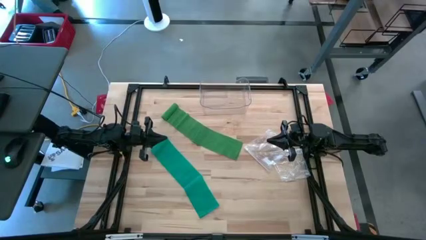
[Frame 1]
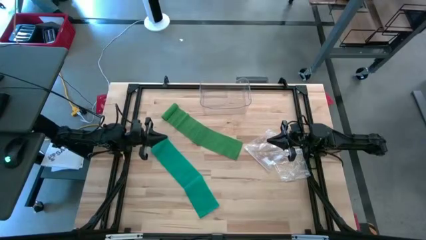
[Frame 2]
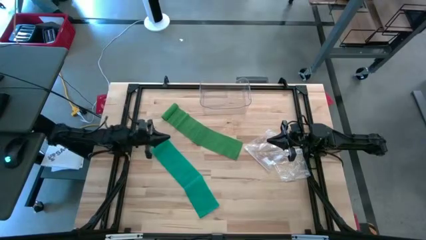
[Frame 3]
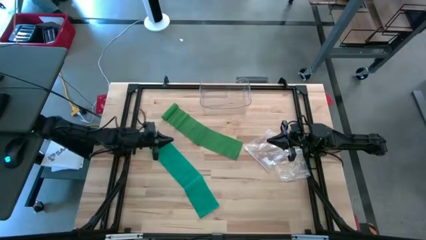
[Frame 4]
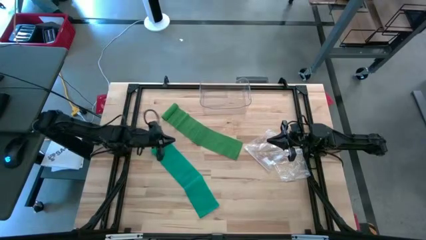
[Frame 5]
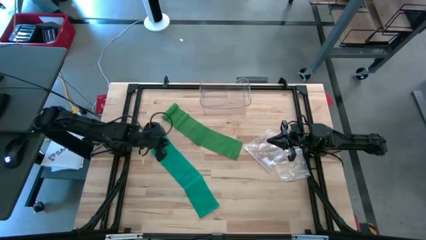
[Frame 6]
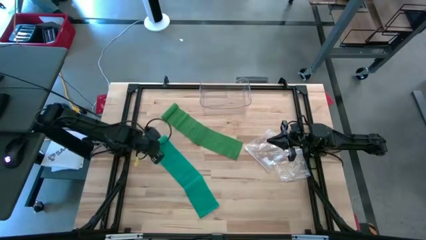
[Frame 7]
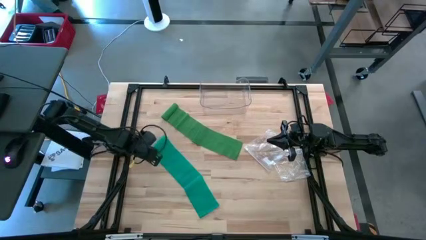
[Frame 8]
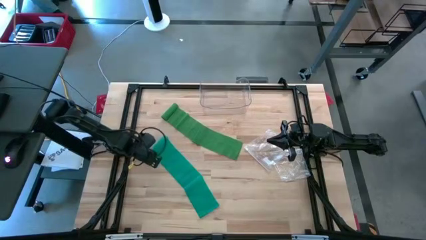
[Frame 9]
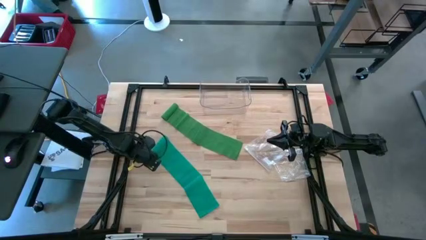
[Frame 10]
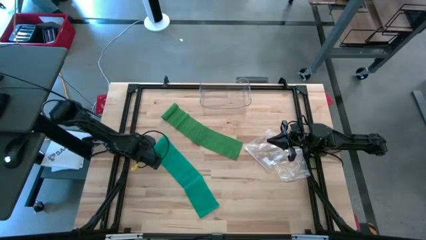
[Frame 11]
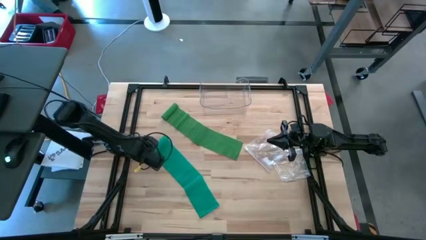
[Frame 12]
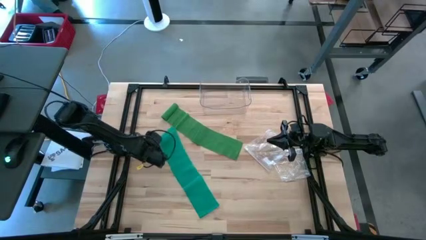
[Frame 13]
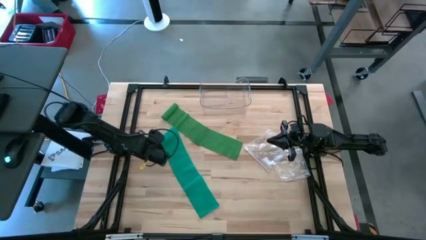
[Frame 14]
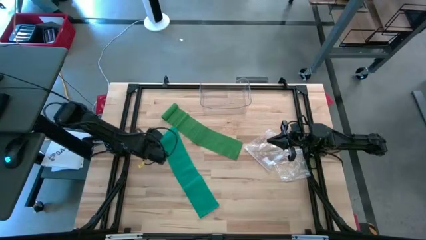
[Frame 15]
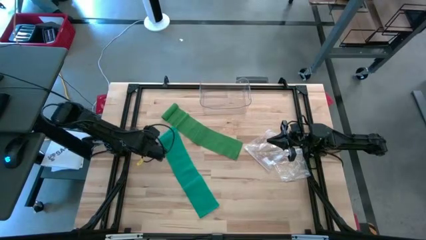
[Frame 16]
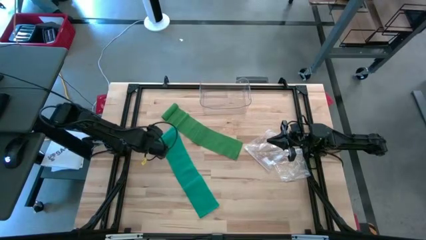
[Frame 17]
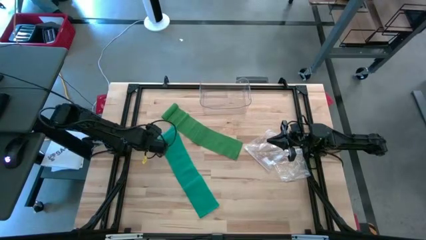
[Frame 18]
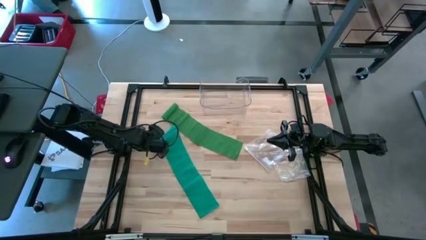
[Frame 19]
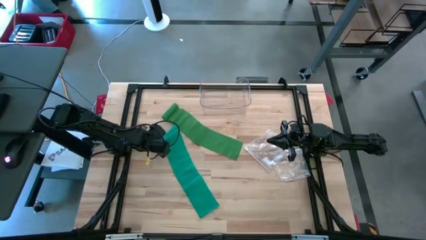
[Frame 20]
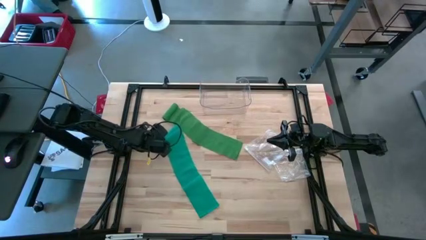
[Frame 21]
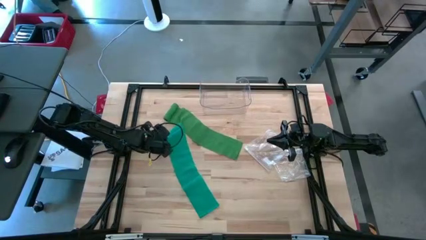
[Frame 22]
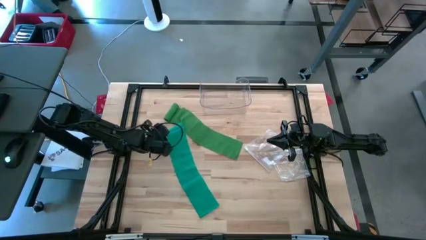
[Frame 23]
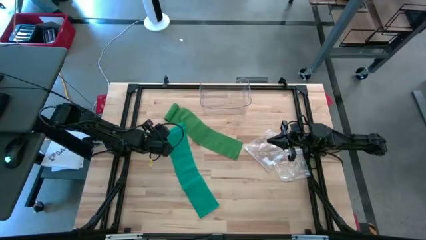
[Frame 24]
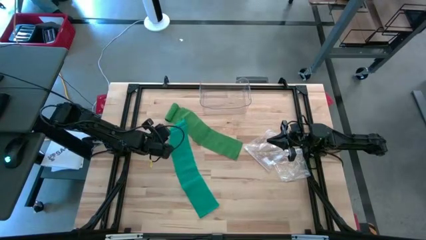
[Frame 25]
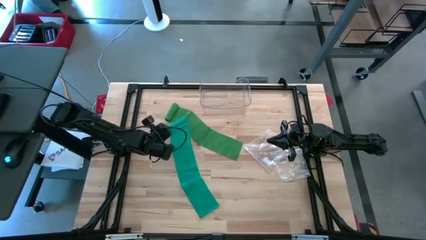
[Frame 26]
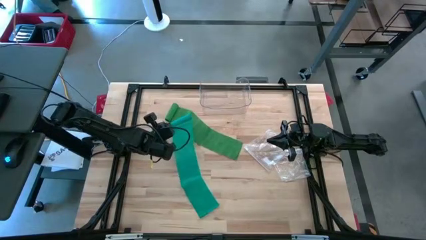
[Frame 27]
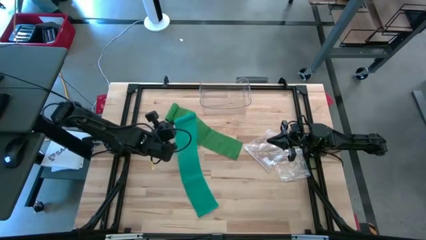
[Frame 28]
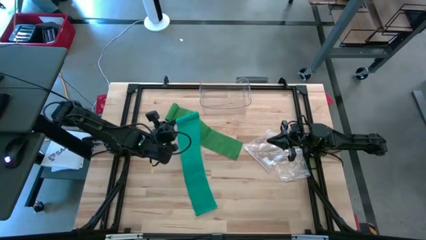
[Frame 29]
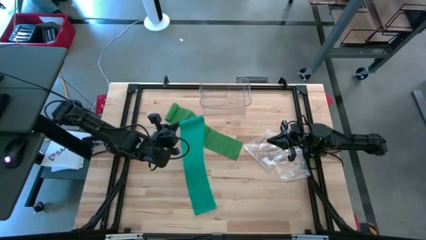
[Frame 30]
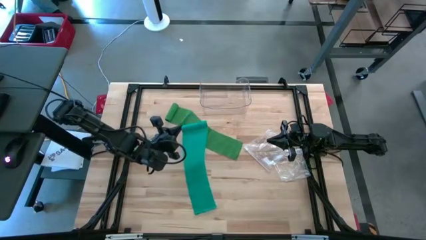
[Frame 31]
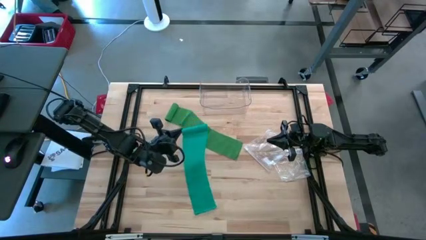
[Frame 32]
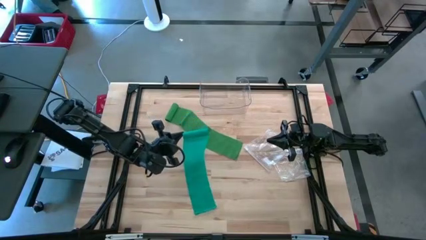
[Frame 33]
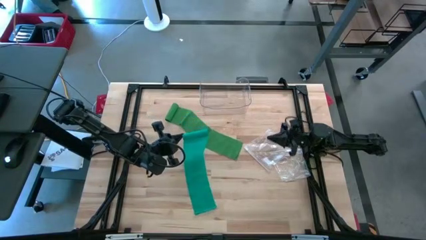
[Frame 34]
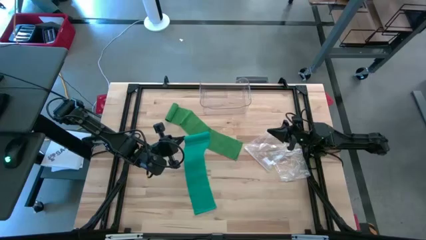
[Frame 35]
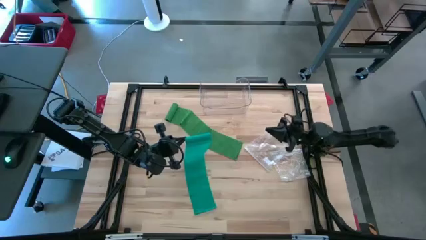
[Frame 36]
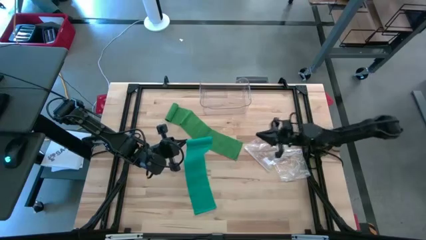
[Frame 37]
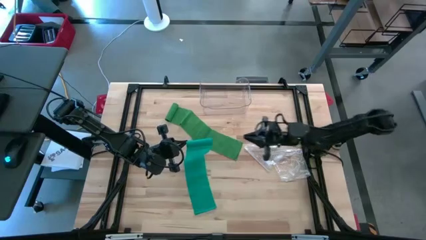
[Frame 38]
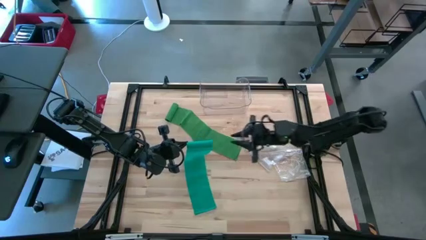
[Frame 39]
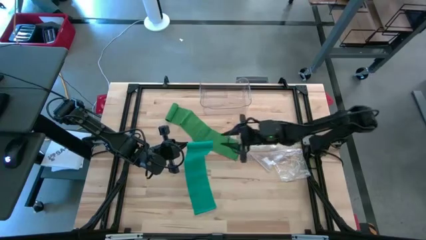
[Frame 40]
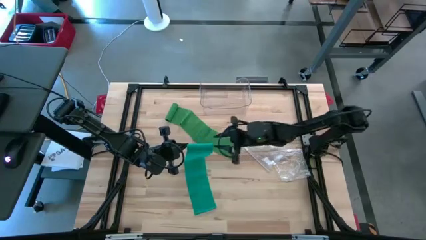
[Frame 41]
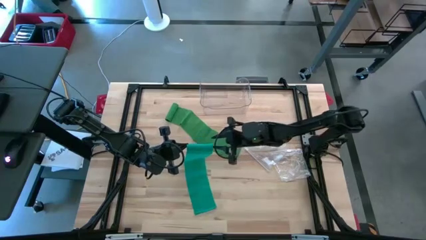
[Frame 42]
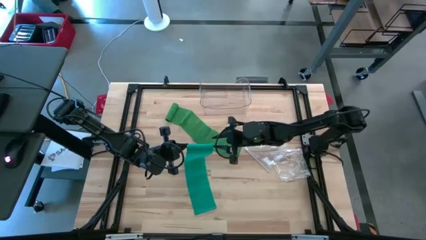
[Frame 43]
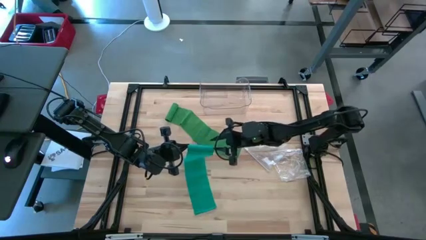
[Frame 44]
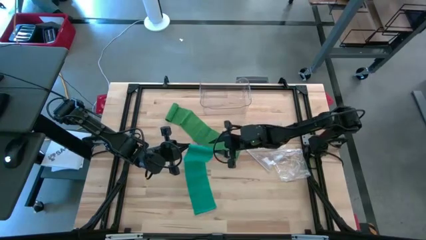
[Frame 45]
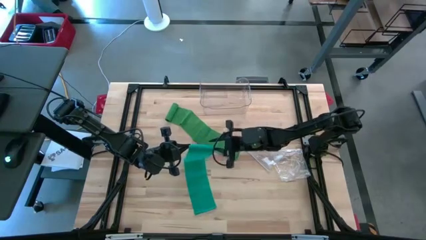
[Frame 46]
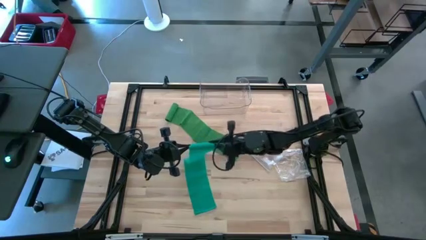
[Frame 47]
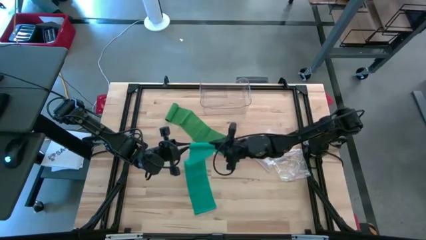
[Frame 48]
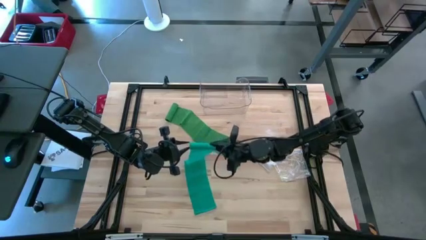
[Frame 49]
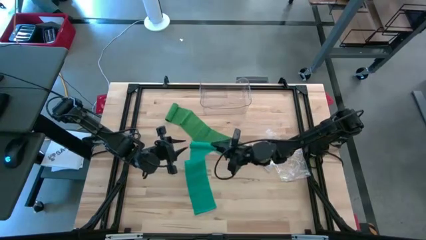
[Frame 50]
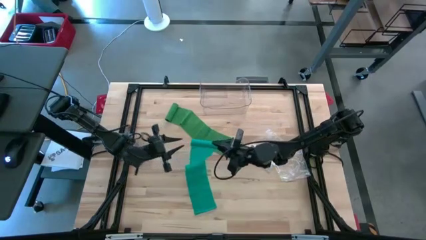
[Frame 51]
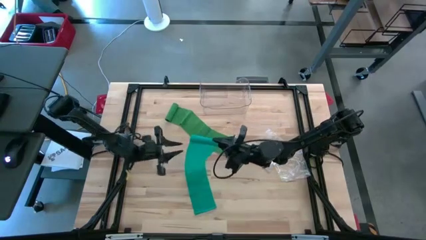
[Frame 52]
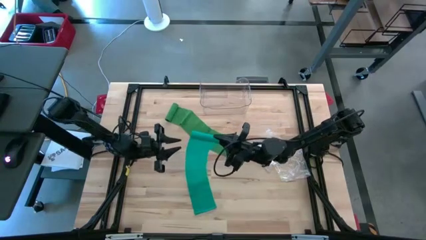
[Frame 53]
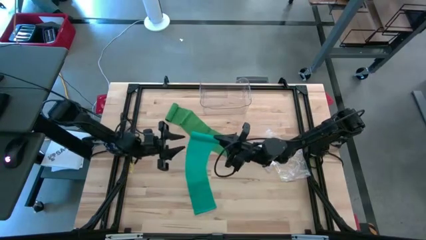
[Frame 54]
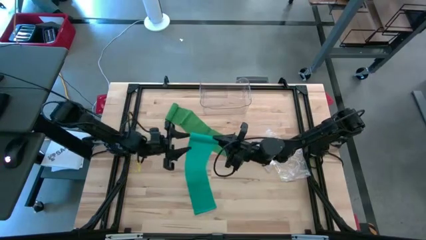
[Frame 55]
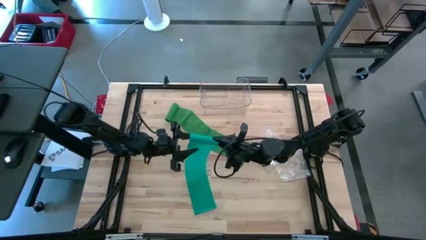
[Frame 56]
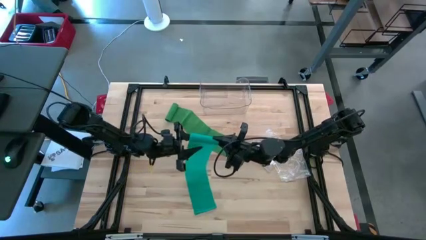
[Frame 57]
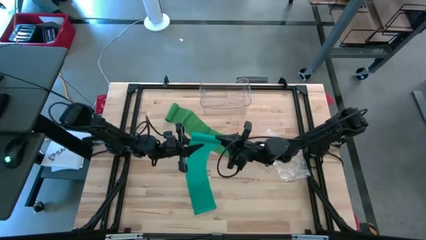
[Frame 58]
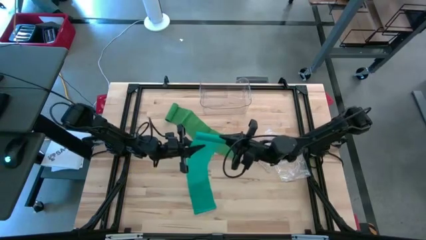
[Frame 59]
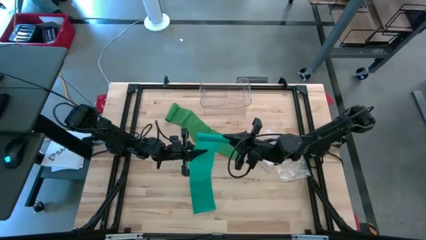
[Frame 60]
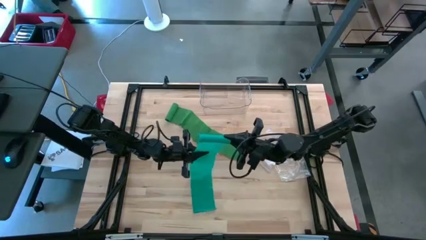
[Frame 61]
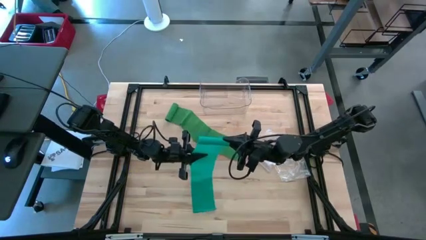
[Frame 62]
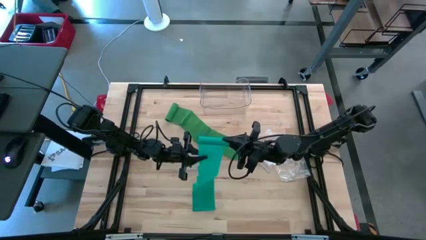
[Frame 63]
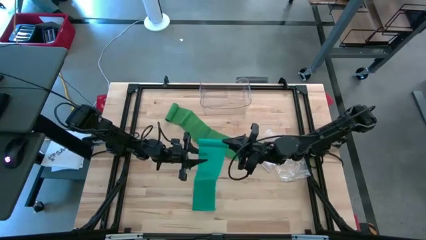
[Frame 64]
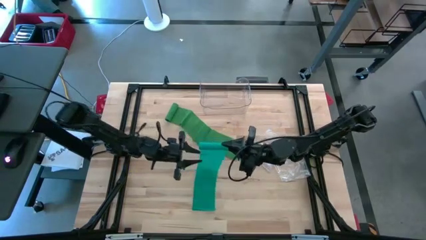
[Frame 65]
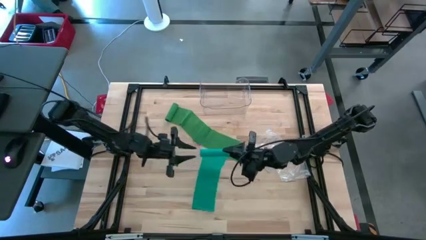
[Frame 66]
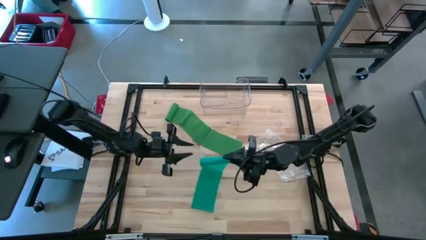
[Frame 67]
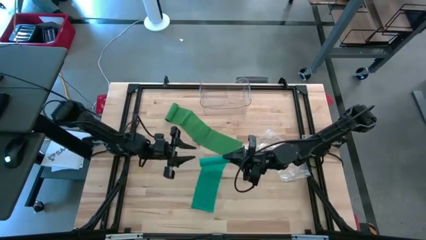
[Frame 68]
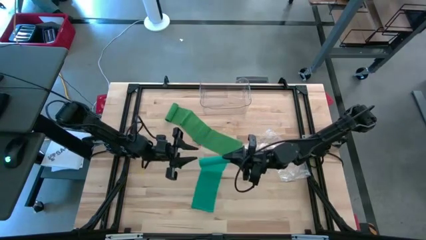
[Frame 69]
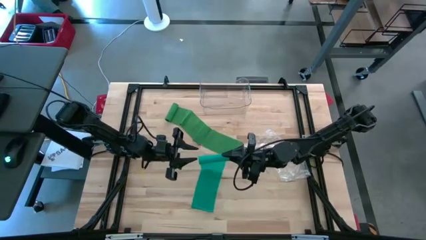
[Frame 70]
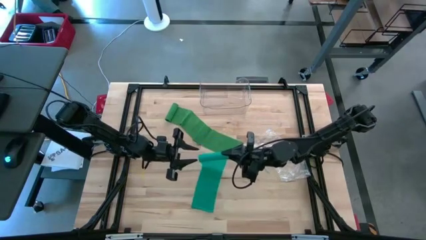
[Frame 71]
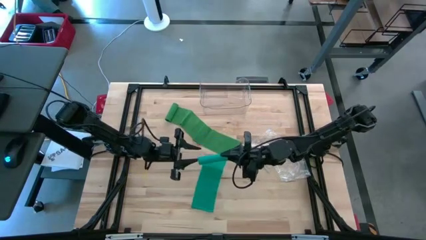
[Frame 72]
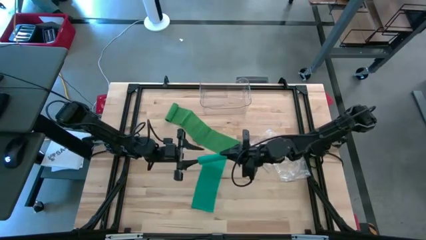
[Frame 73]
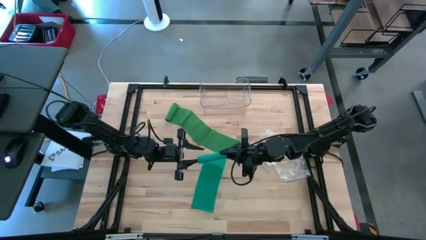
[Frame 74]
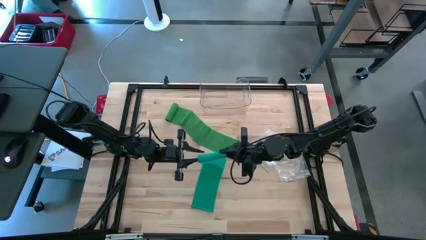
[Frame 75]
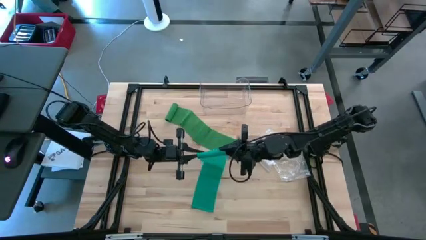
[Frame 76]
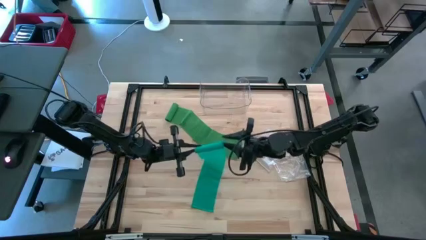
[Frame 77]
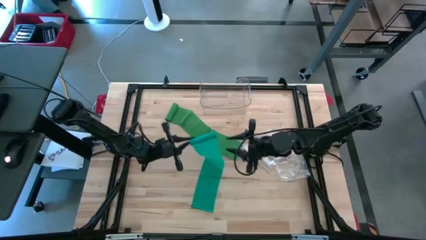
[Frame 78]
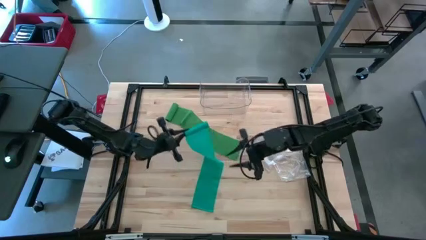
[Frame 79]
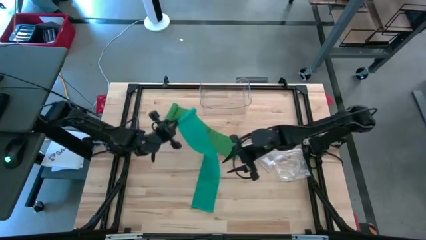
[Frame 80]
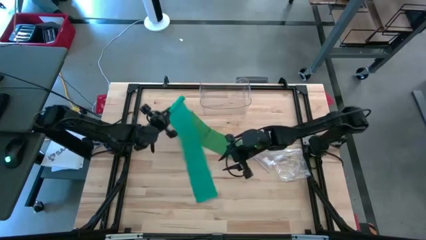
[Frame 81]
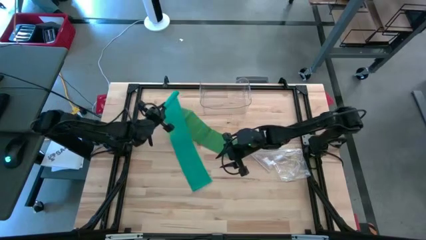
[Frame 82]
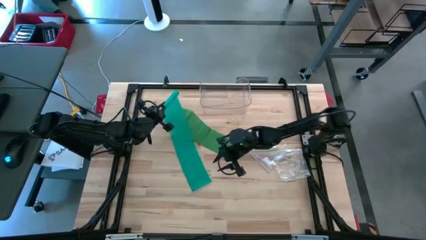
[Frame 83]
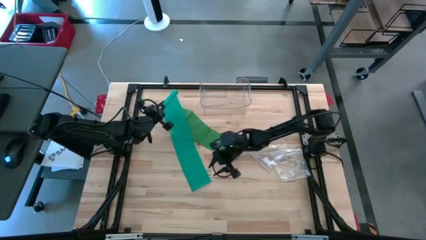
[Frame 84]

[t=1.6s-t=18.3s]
Task: Roll bandage
Roll the blue bandage
